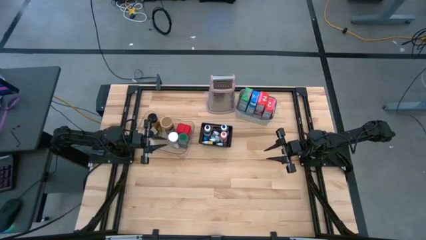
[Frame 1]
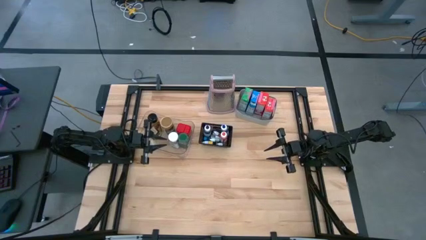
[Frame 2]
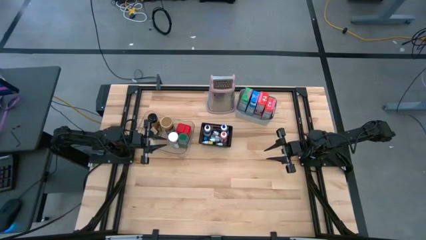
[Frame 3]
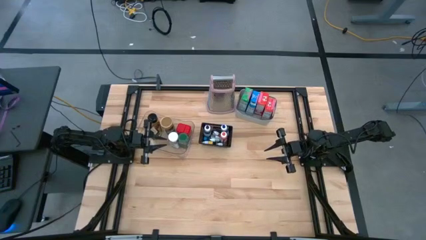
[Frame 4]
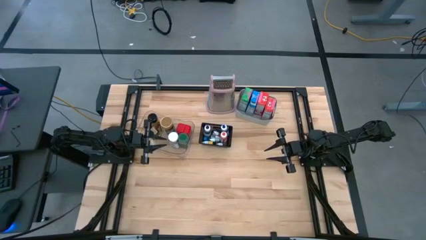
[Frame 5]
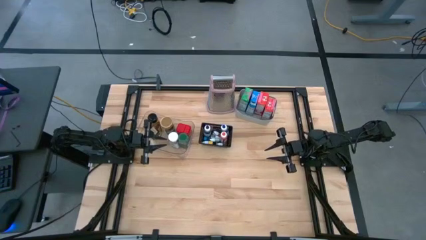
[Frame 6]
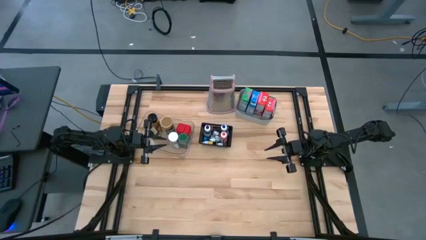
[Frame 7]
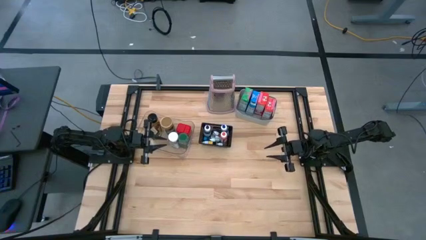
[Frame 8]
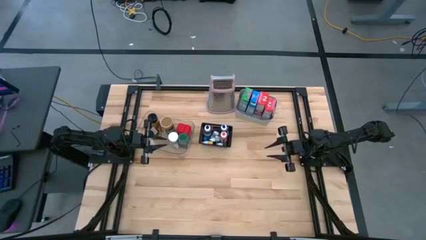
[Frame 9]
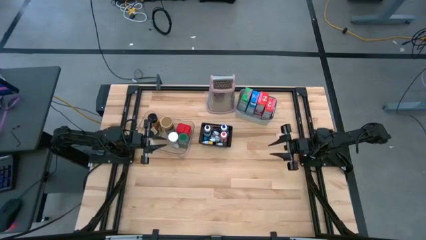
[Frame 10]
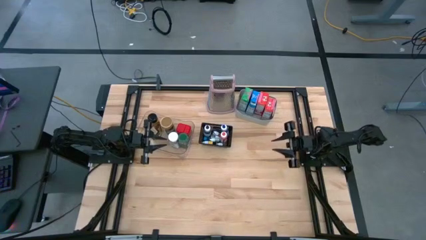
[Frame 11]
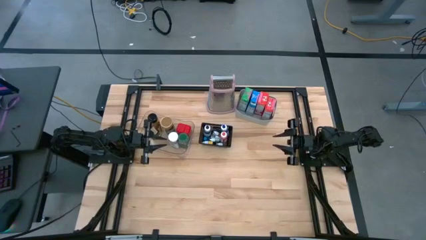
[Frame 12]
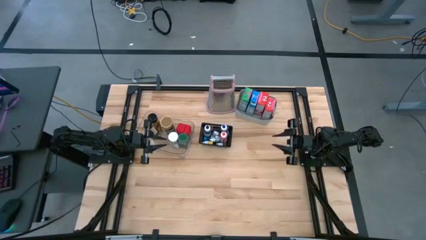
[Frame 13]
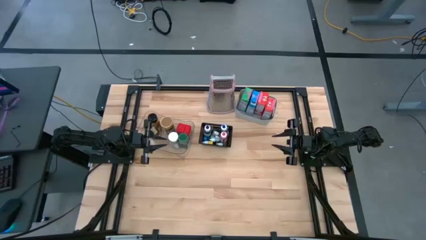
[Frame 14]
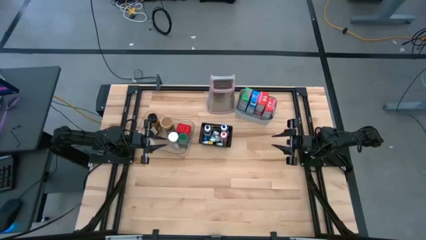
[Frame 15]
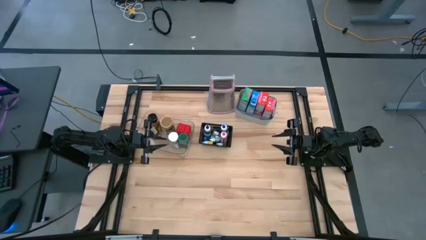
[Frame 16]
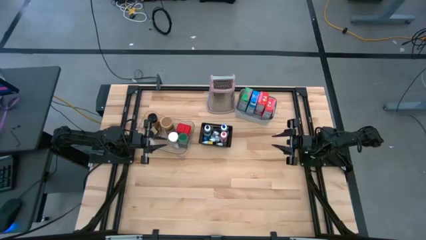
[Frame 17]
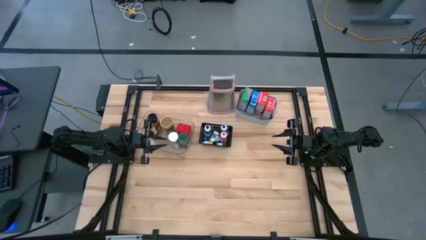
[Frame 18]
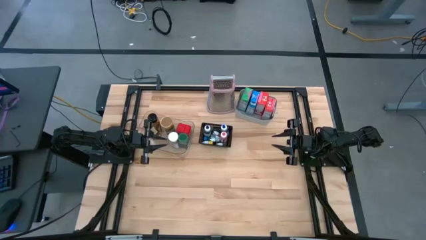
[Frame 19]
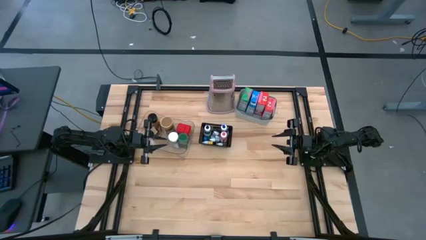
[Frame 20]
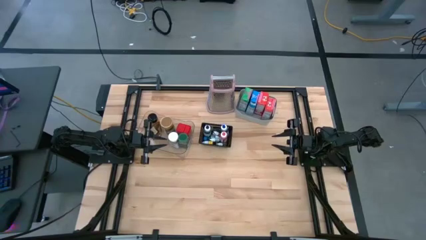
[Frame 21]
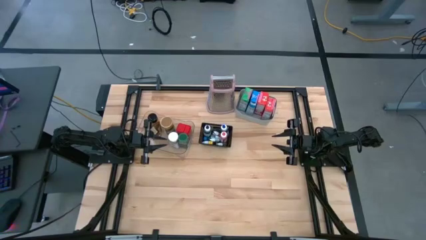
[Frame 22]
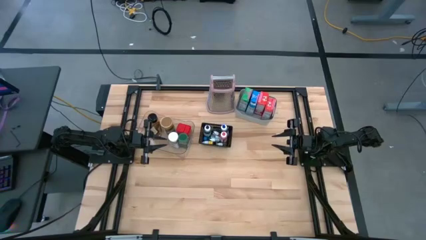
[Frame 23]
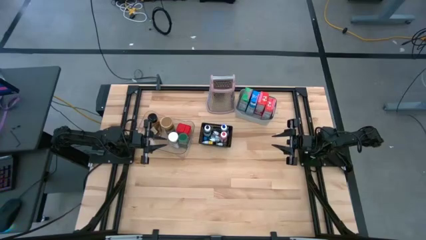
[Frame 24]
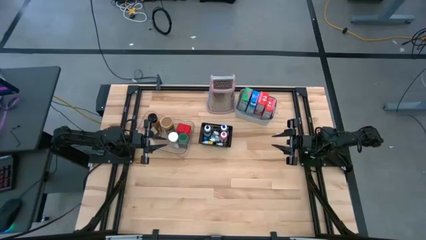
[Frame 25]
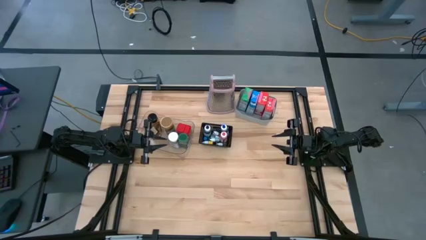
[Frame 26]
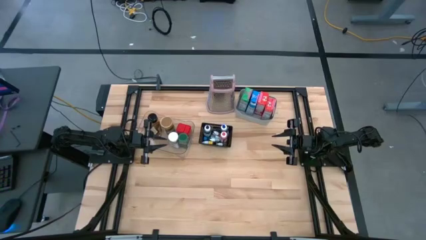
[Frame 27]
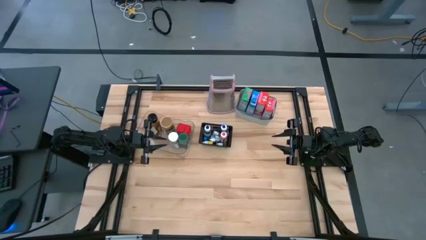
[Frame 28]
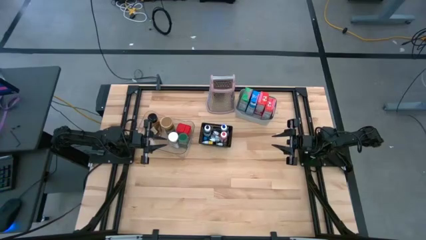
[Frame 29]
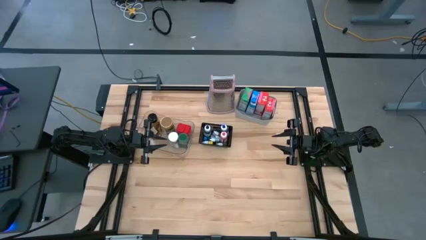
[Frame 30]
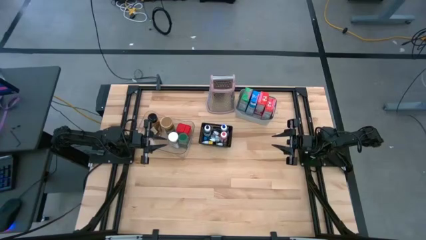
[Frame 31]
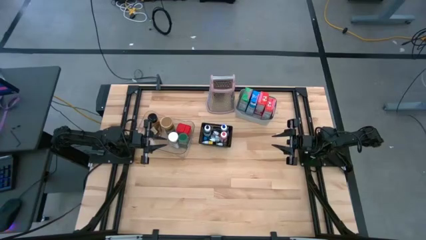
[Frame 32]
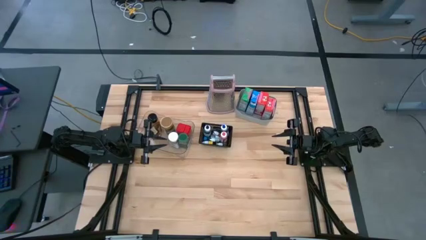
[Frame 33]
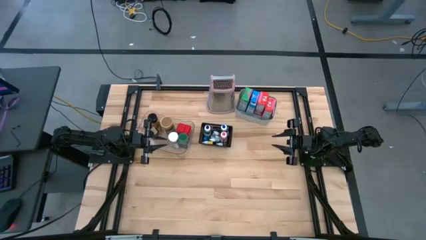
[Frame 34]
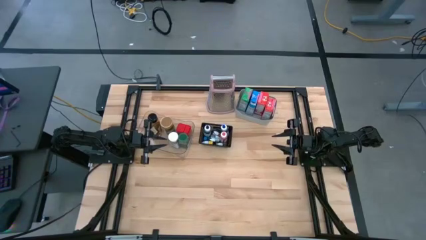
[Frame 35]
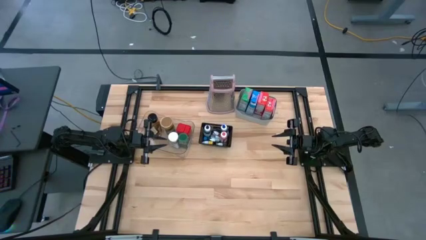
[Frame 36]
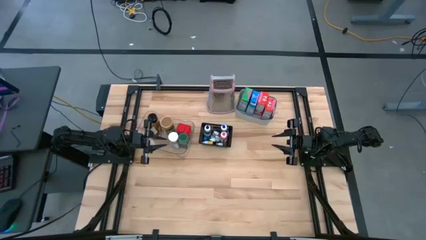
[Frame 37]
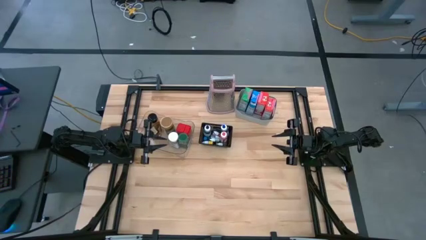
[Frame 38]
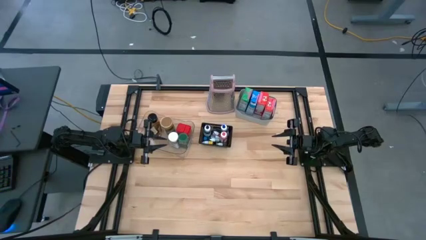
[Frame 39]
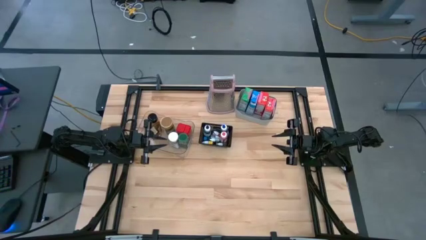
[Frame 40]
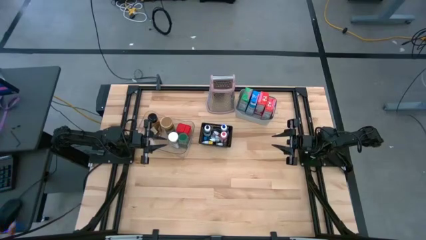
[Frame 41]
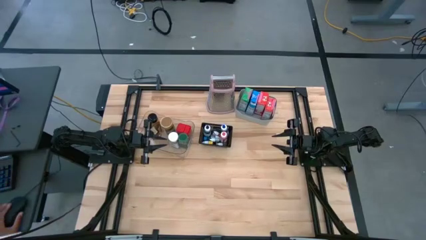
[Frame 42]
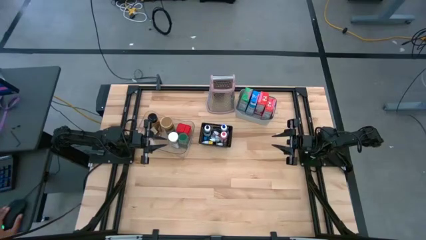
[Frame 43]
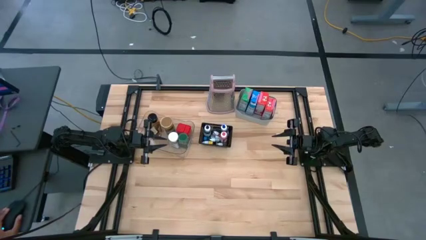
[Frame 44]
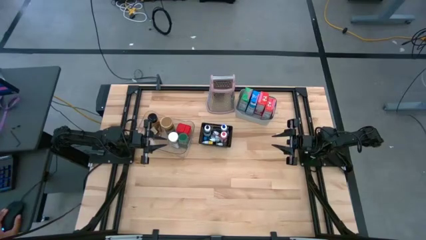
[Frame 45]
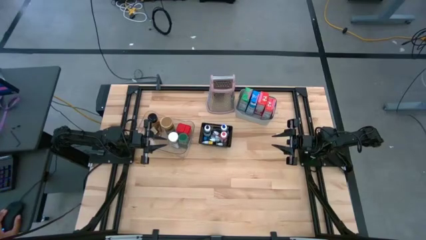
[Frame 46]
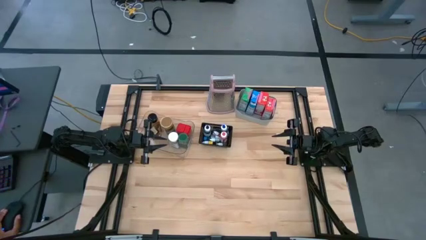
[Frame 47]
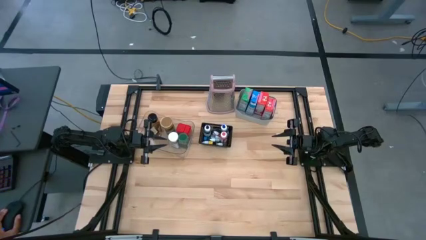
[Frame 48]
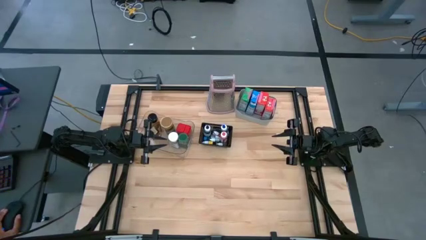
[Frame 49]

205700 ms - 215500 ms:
Task: Pick & Place Kitchen Items
Return to Home Position

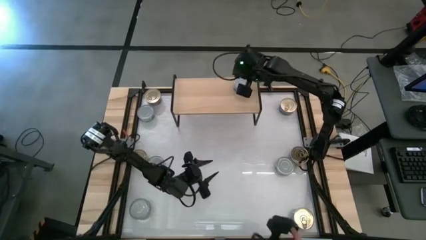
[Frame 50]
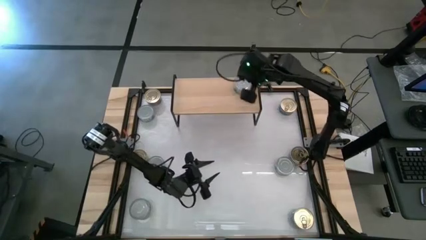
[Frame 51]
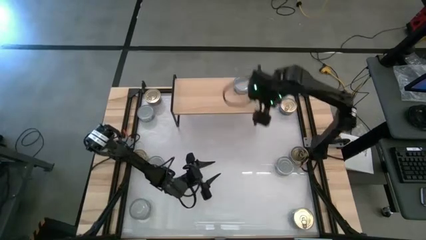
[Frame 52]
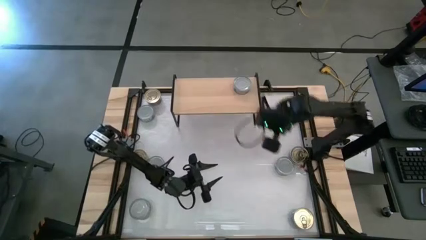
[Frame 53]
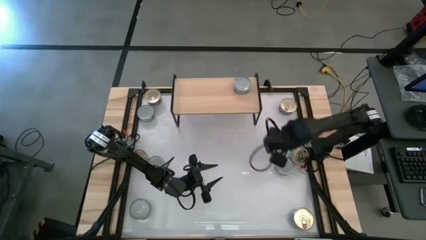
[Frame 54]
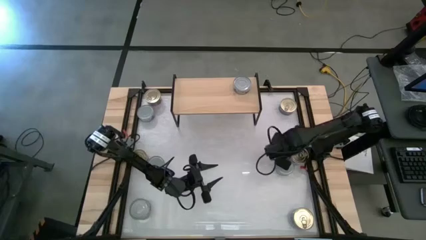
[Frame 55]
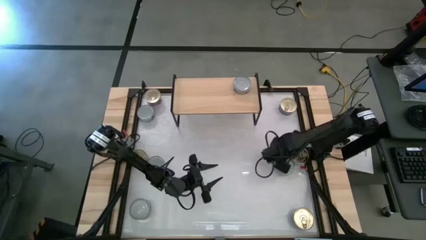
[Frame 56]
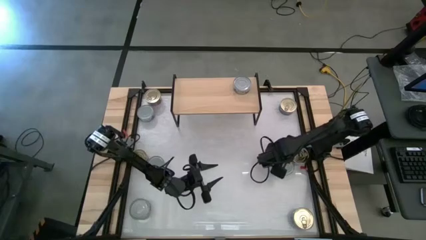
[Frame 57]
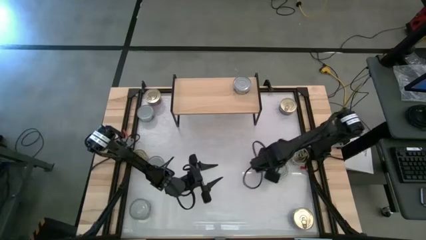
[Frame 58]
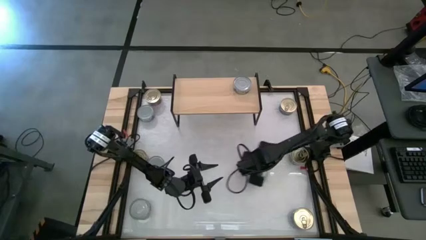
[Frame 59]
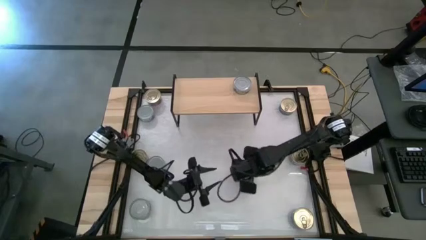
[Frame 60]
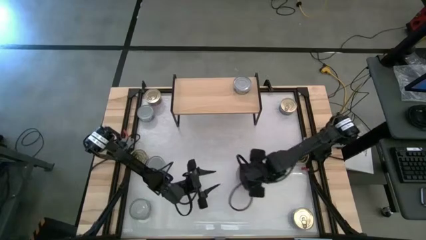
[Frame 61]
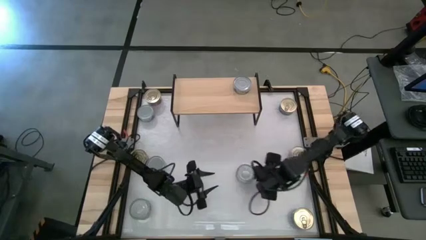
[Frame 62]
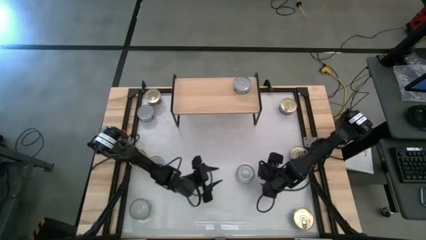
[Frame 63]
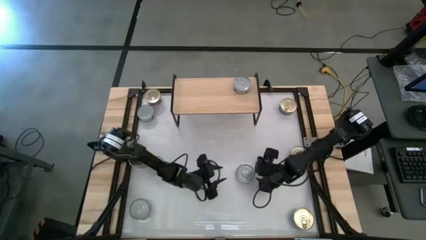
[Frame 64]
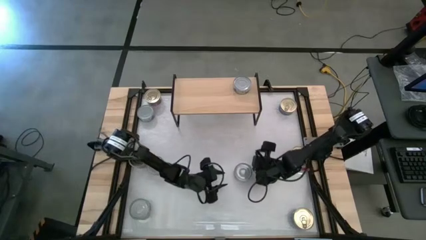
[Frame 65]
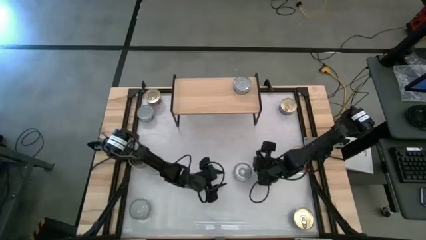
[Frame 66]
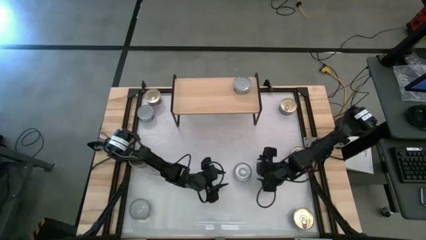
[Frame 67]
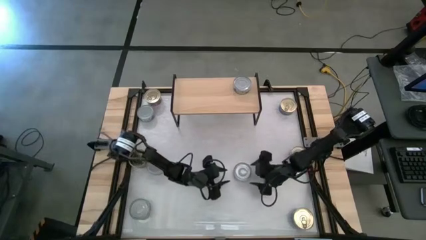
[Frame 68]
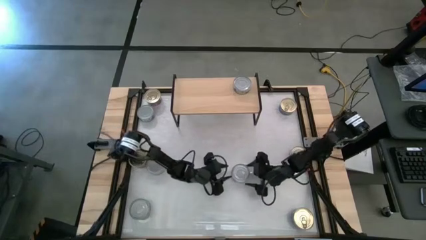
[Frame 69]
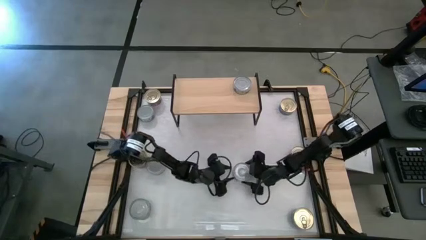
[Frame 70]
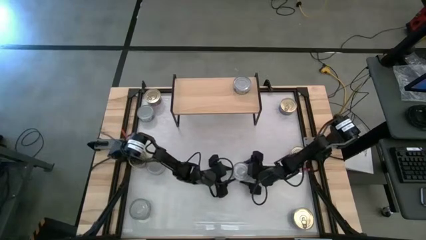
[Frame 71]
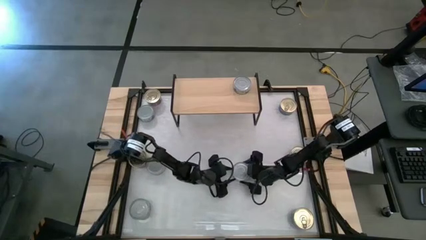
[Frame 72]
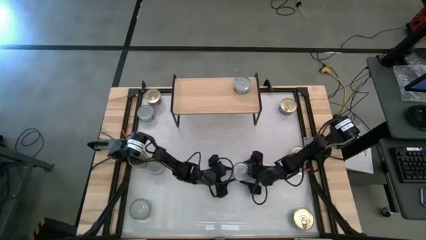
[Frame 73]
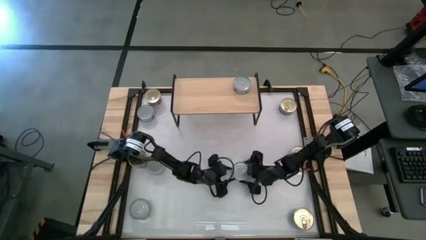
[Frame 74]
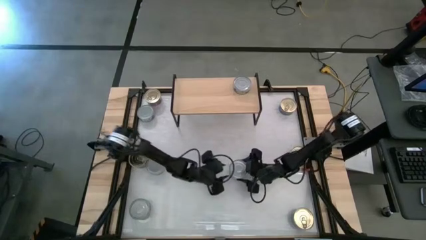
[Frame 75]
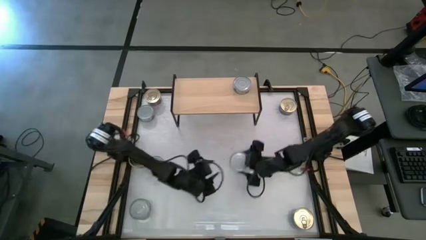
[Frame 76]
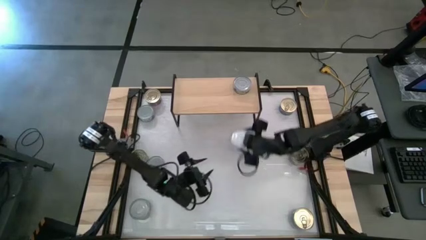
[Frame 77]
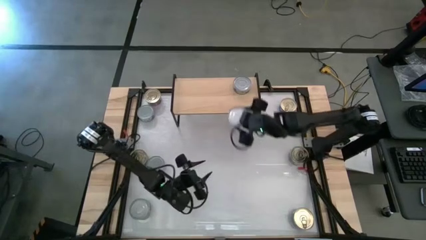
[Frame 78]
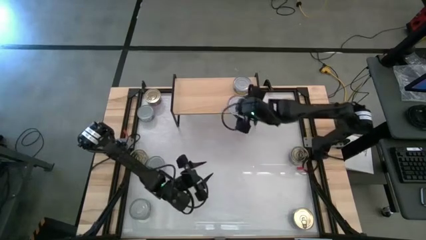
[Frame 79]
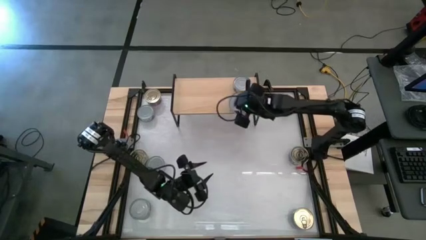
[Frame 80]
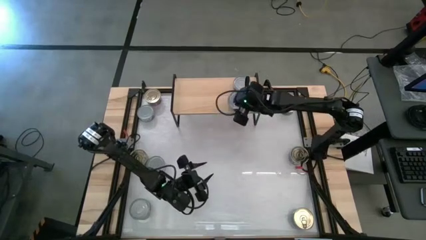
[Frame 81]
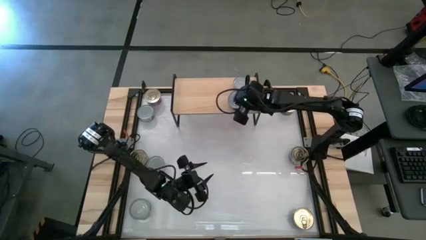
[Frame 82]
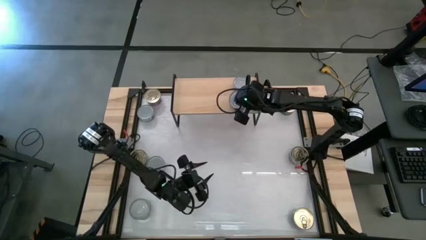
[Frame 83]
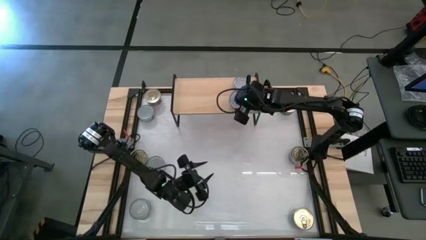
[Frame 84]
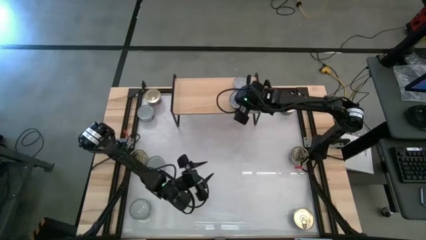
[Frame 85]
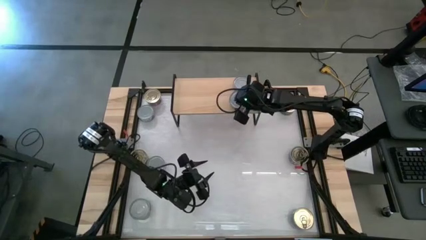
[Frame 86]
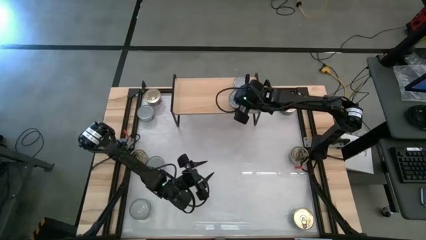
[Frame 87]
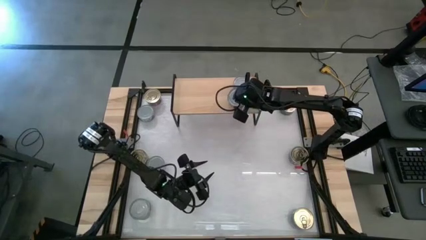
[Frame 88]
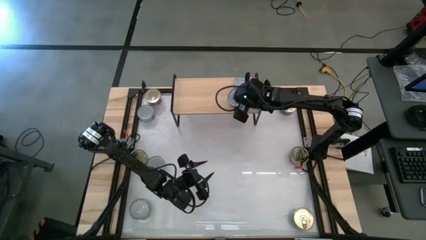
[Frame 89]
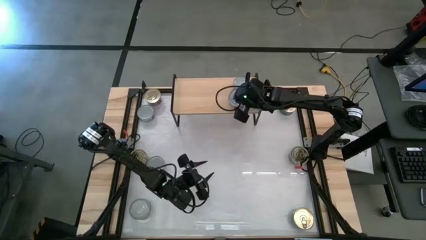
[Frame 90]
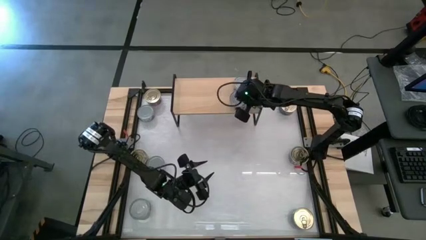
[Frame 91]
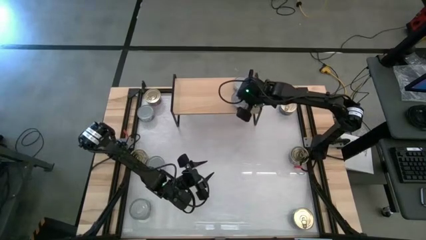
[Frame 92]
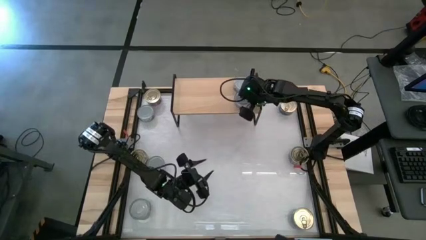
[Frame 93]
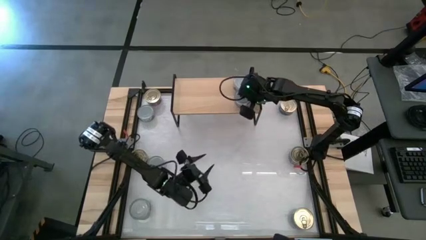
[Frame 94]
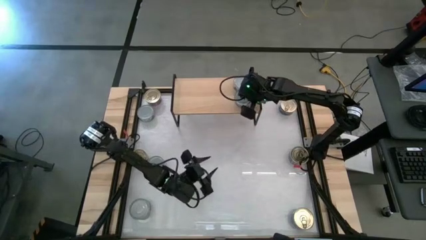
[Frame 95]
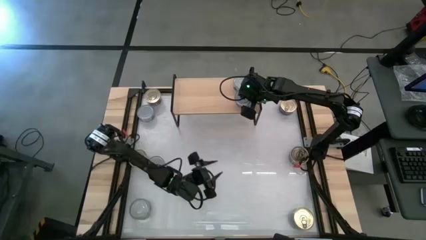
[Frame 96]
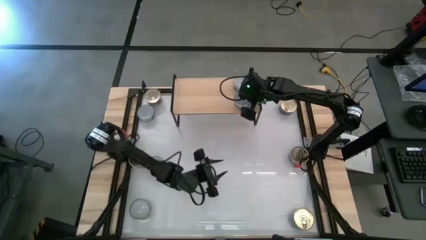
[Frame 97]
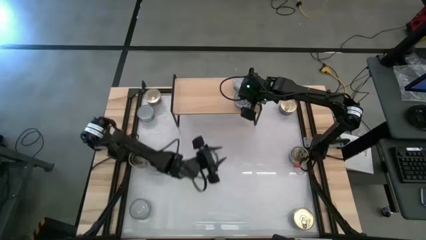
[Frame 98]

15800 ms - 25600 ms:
Task: Stack canned seafood by type on shelf
Put the right green tuna can on the shelf aligned with the other green tuna can on the shelf
